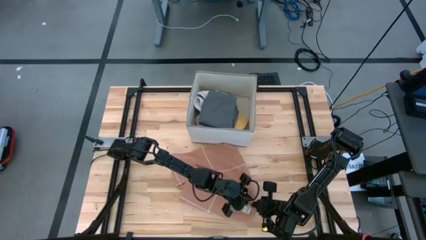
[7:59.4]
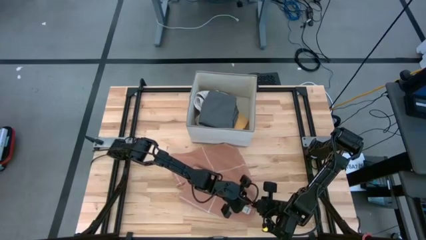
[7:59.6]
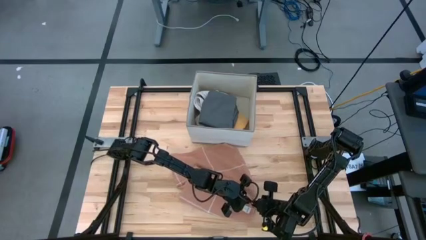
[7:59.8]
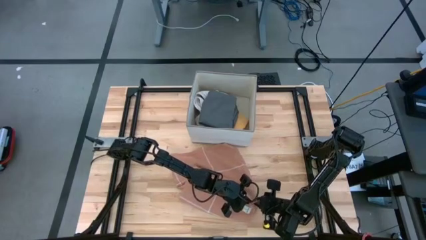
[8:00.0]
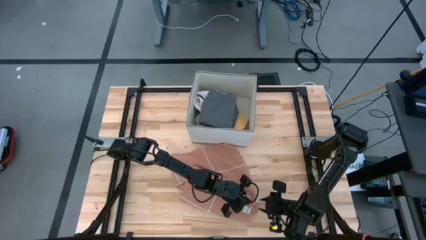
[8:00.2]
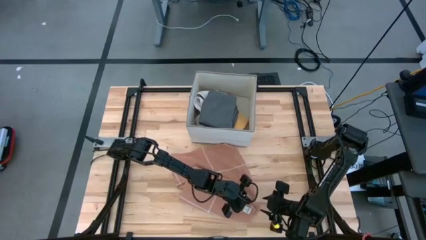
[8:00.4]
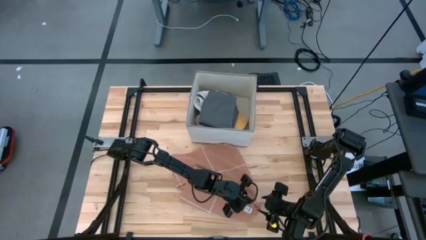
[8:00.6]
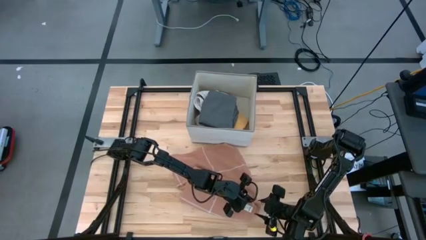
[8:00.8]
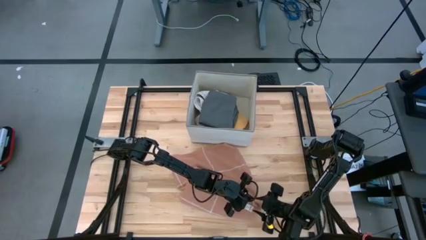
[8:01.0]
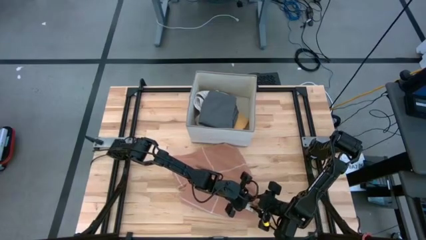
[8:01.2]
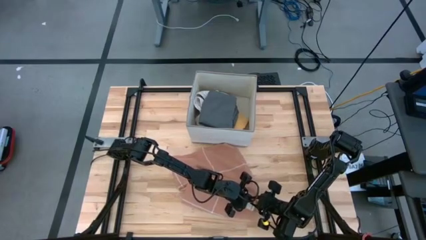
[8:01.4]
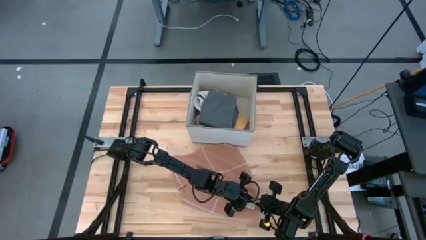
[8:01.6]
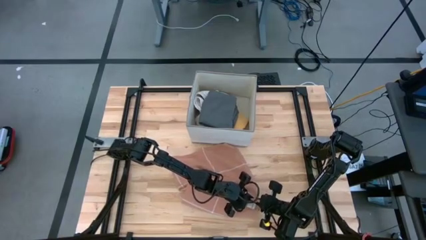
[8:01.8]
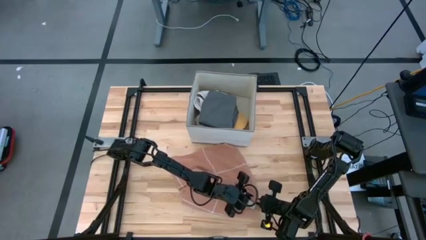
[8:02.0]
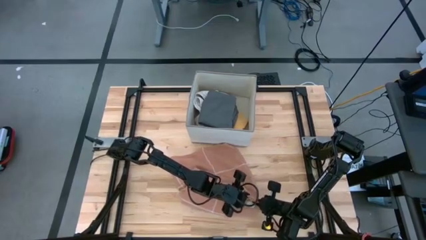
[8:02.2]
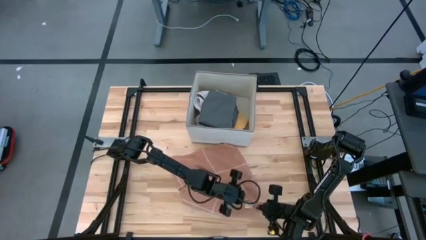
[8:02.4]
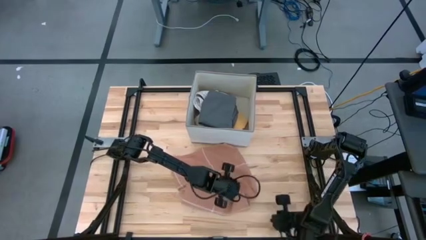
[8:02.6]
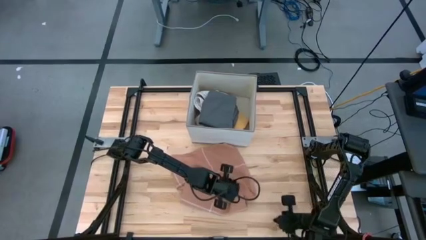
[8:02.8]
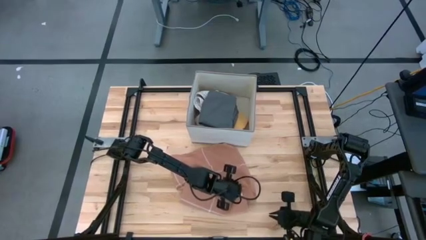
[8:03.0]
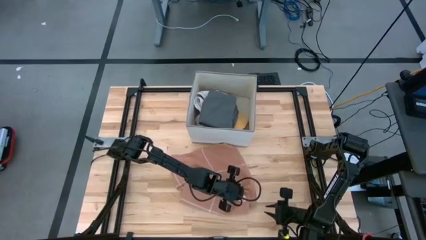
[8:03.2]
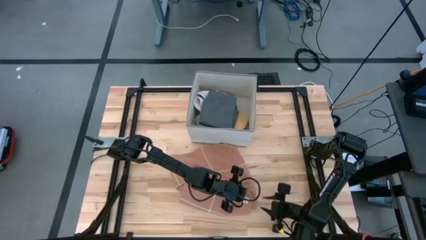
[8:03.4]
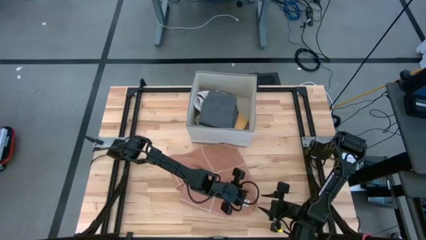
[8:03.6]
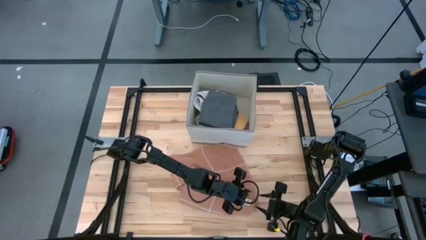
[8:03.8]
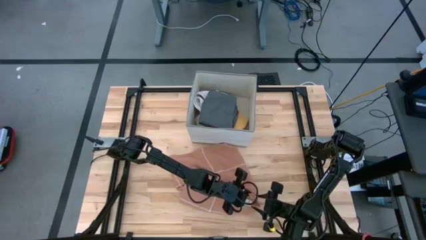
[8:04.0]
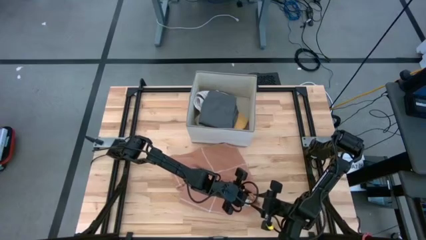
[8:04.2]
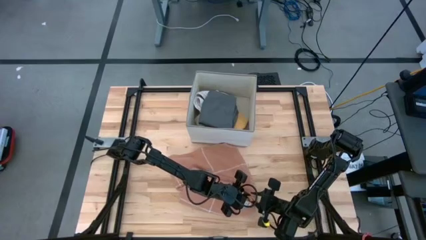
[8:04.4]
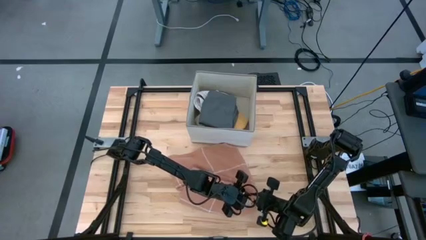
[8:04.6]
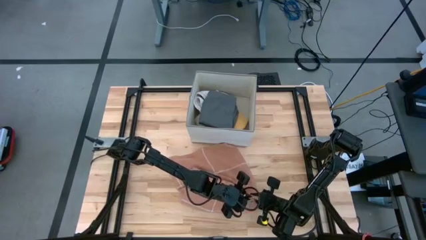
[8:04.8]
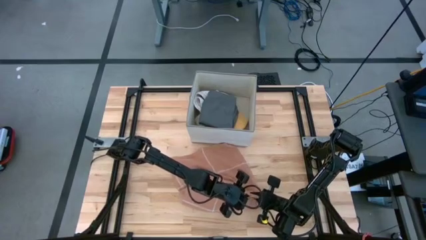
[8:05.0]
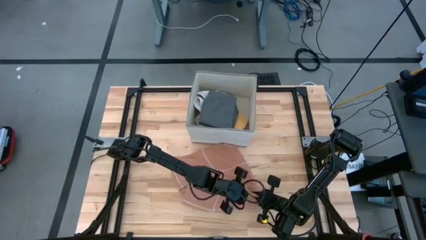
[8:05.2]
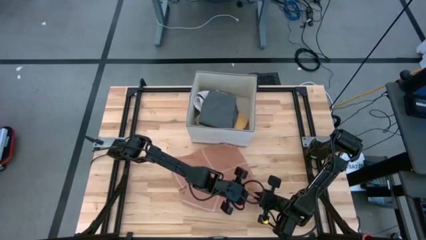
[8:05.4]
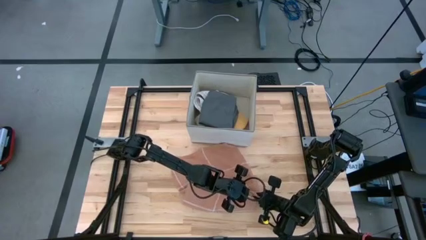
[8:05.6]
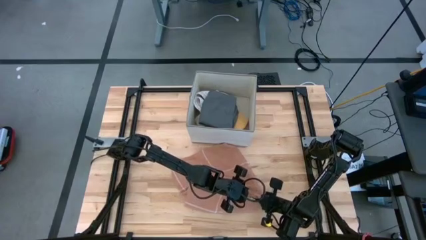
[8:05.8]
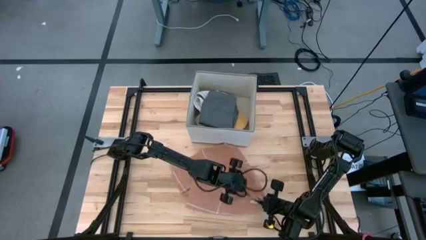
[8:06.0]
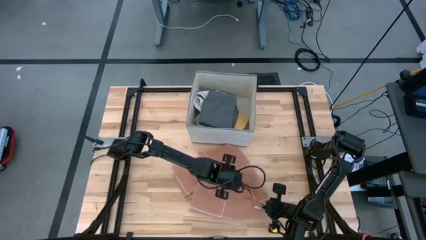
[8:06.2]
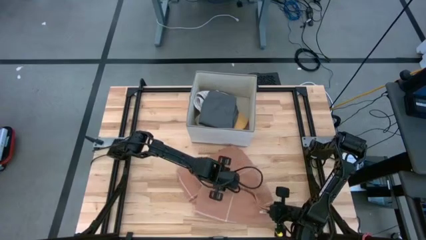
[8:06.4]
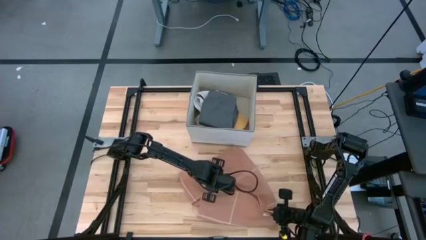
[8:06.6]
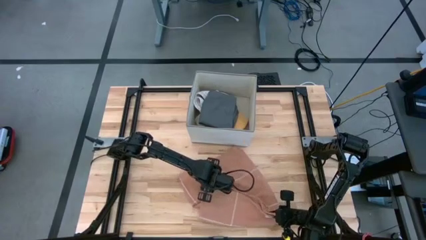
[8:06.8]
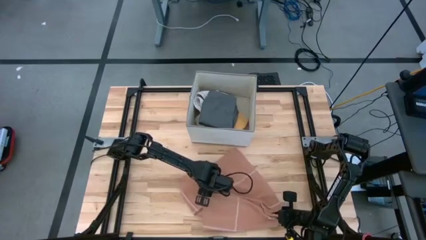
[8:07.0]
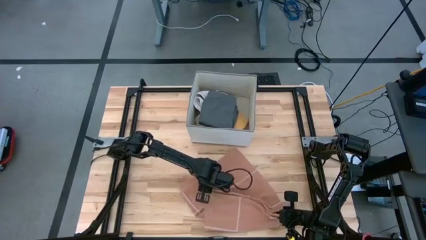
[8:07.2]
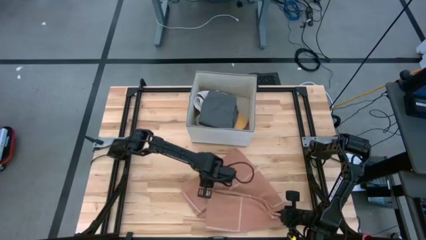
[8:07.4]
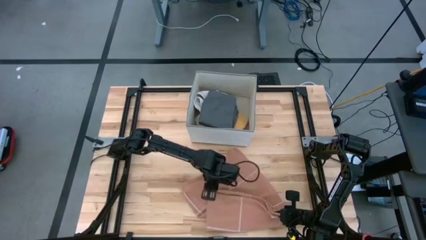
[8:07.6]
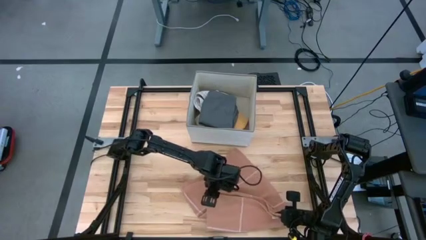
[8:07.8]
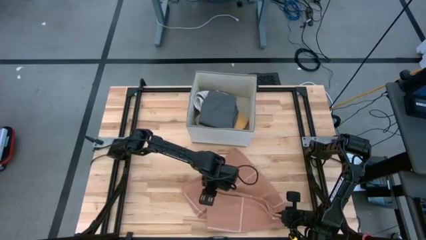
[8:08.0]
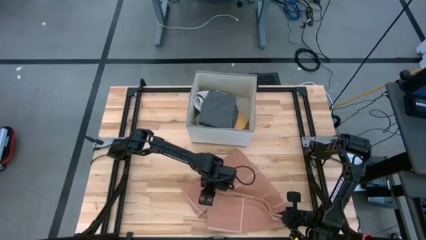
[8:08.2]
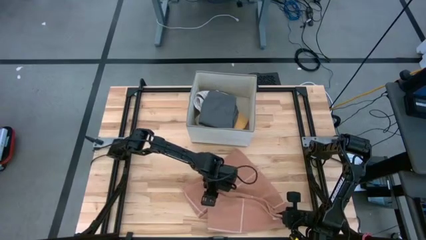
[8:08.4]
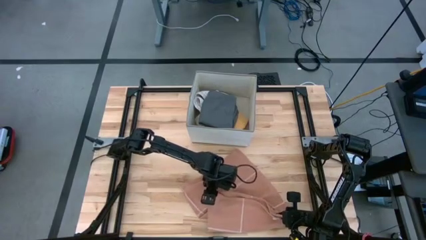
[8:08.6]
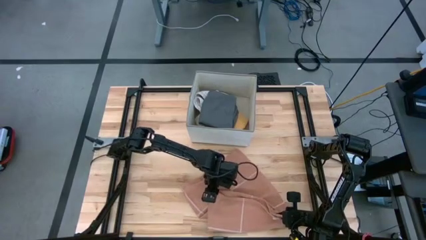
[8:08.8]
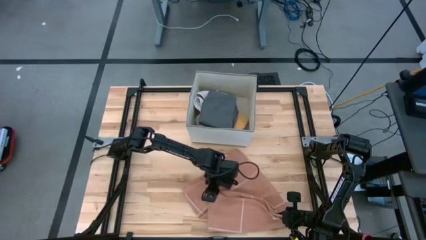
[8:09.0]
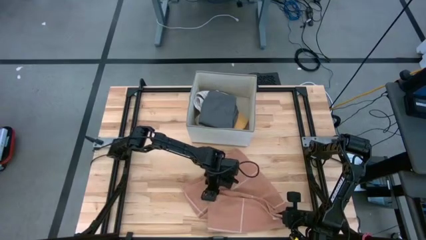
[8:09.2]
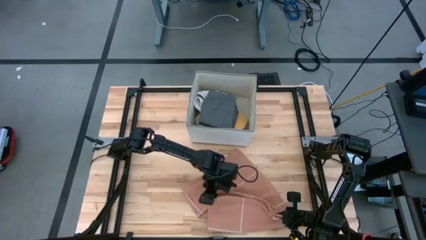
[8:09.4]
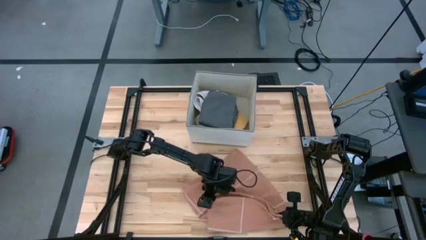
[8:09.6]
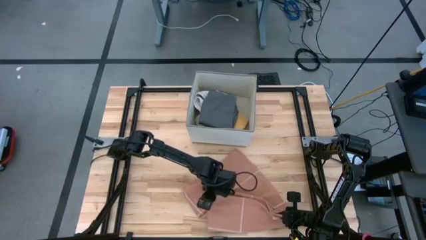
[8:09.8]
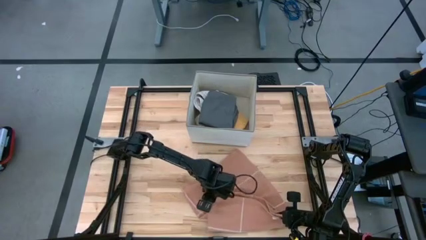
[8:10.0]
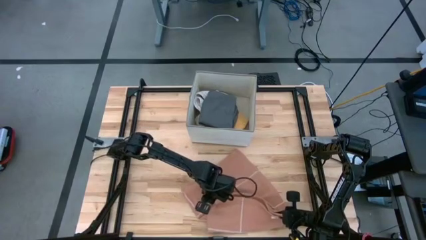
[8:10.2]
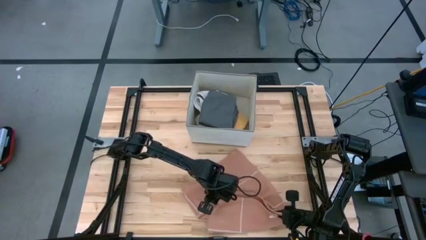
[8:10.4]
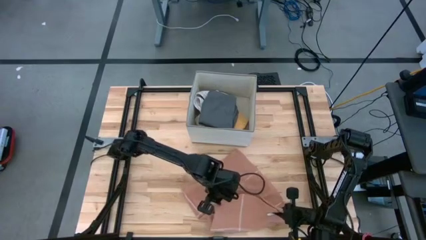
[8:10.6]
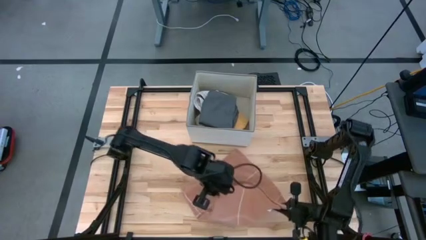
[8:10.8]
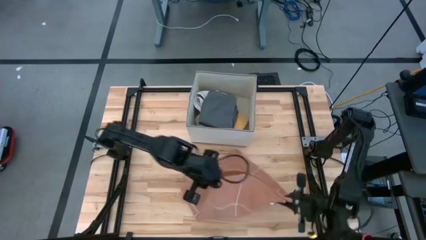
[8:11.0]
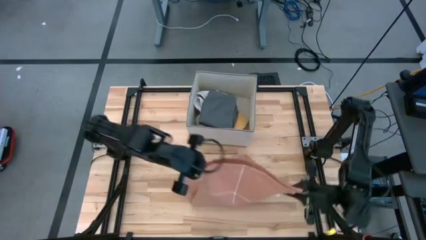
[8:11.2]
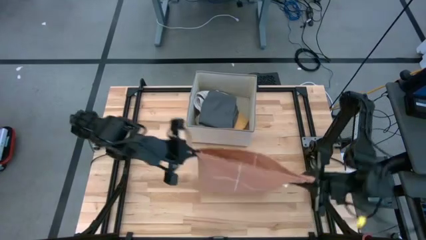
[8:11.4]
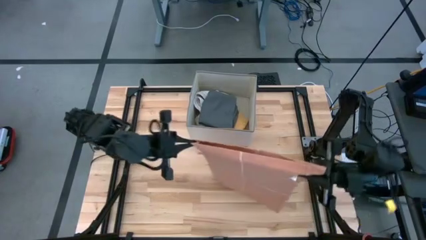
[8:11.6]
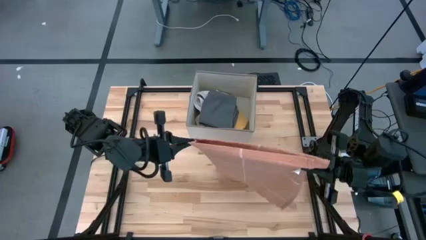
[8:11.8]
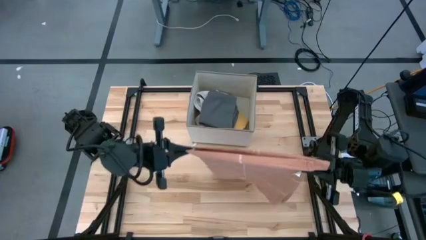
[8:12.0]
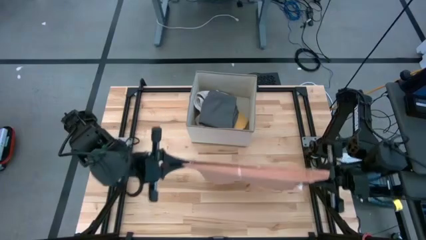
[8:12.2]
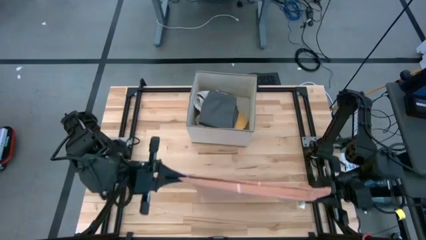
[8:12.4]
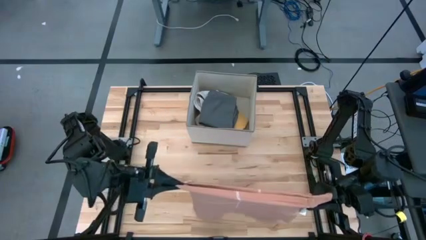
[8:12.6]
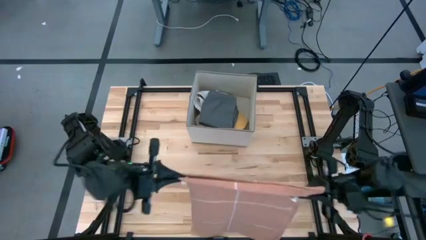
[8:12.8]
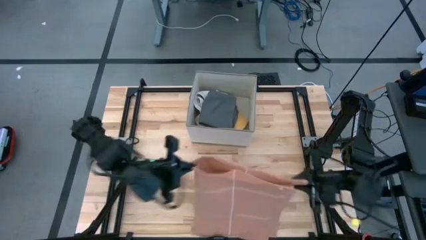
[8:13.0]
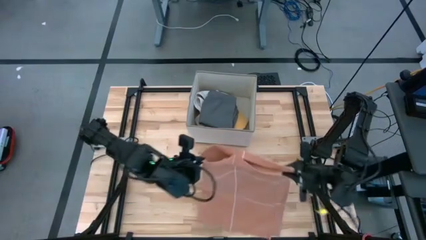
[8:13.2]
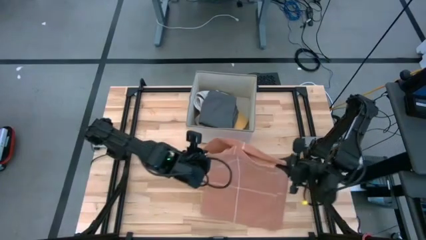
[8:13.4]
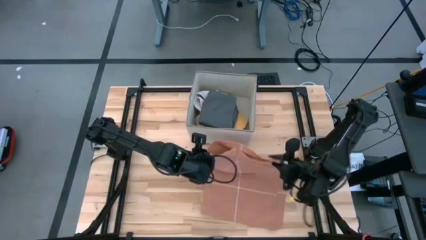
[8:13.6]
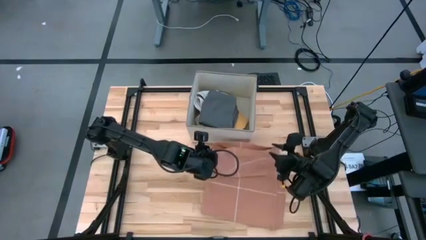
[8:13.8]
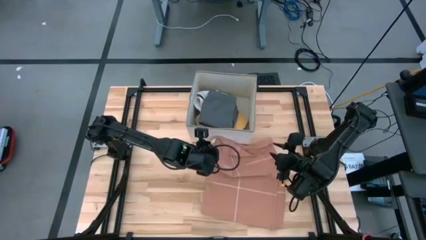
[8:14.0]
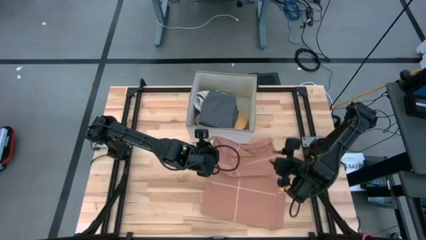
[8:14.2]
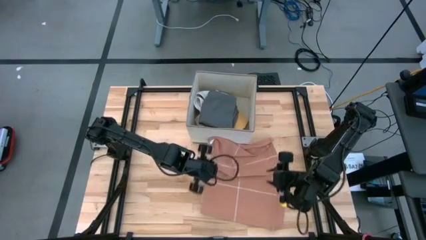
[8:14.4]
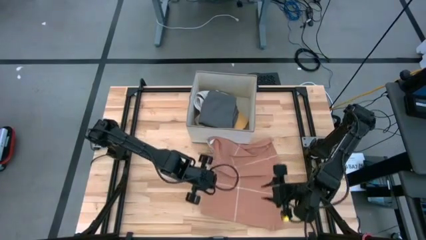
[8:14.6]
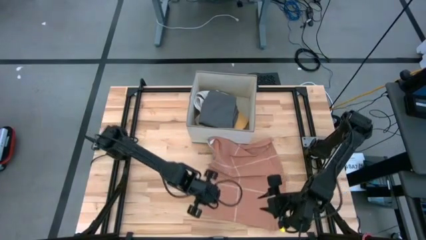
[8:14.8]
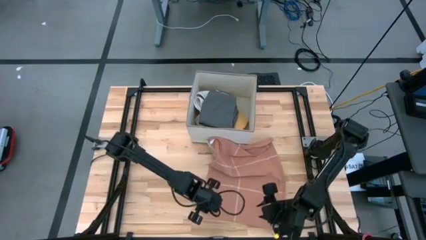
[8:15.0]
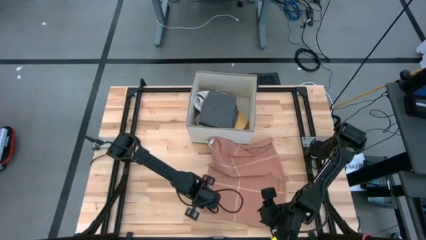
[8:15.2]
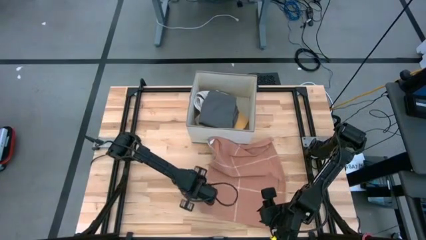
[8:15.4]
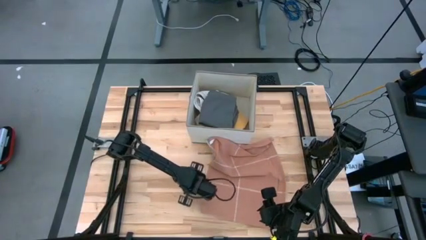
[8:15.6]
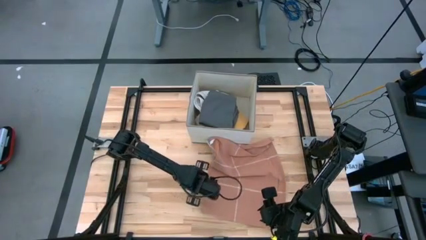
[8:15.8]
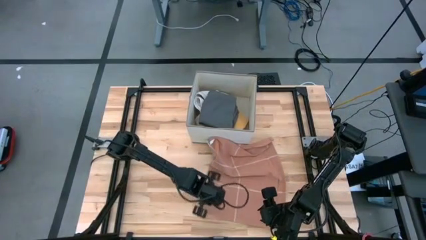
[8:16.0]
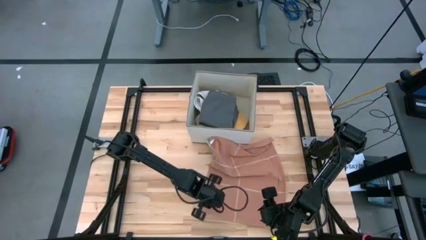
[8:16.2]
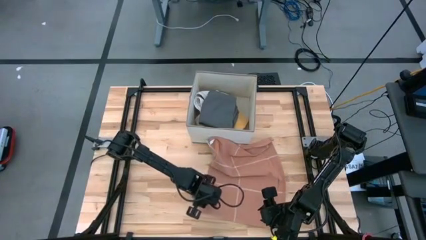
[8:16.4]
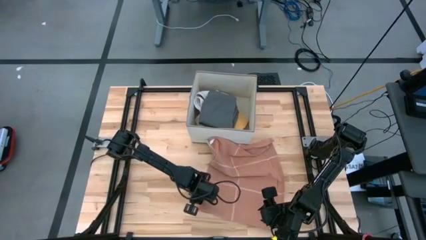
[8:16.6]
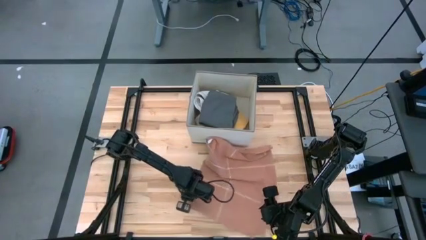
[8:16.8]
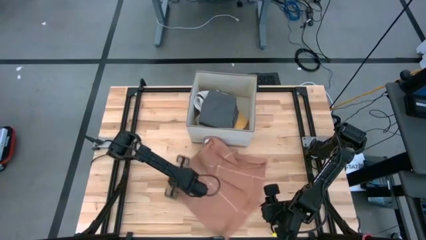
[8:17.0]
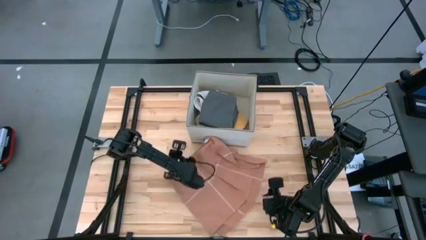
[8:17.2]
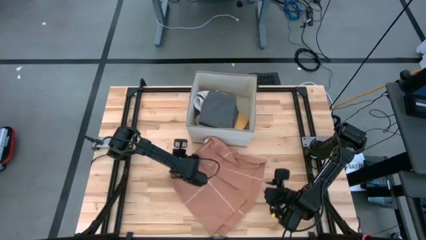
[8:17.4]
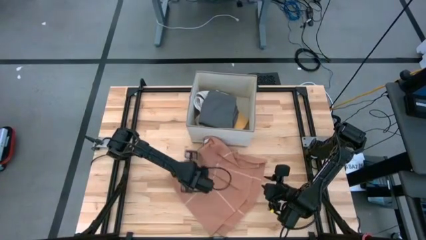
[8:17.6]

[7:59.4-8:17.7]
Task: Fold towel
Fold the brown towel with white checkered lines
